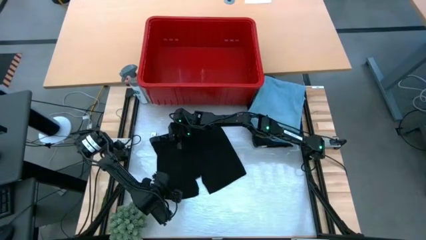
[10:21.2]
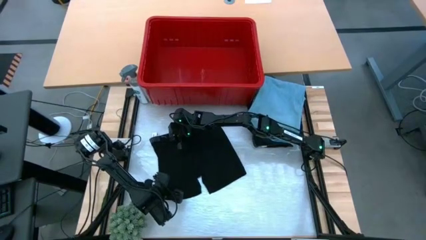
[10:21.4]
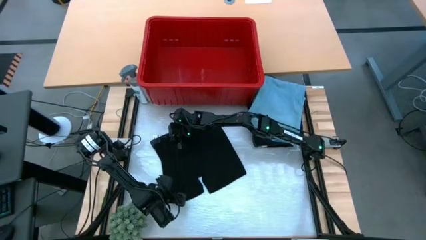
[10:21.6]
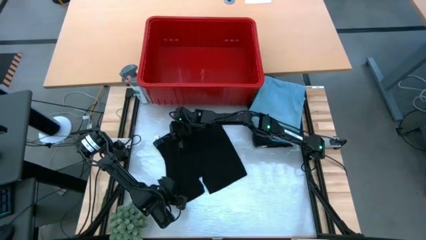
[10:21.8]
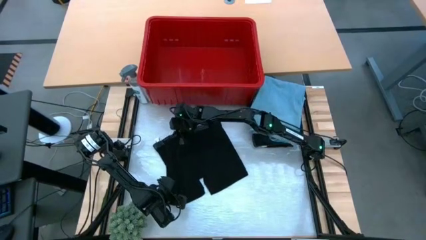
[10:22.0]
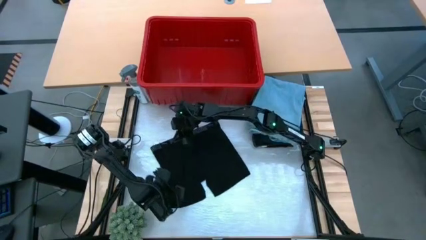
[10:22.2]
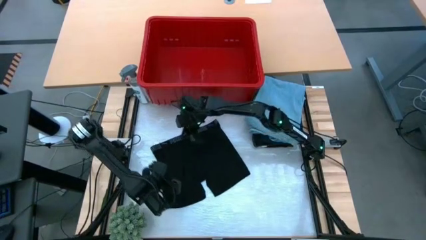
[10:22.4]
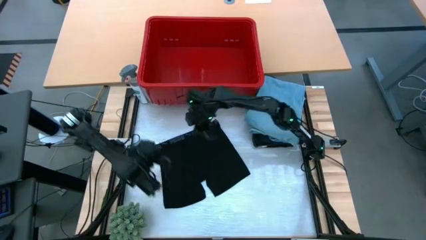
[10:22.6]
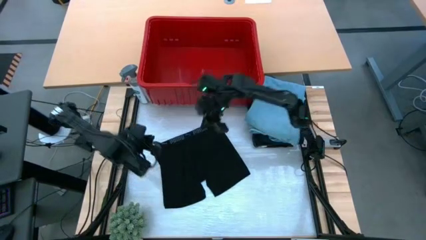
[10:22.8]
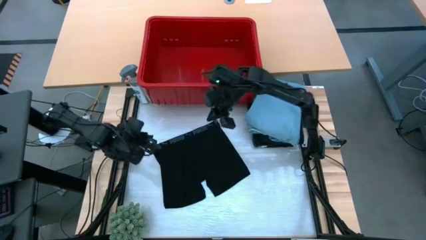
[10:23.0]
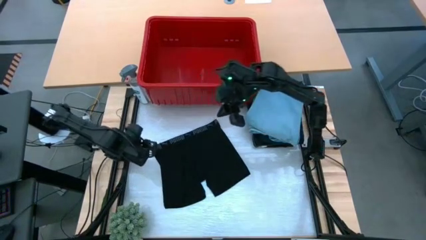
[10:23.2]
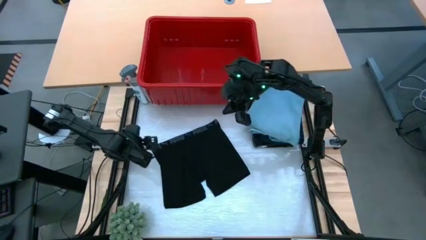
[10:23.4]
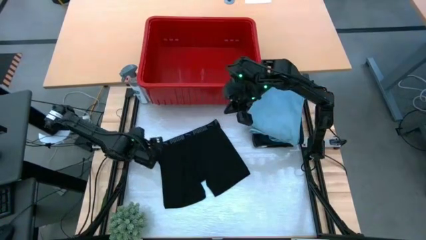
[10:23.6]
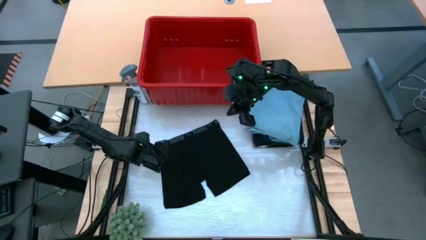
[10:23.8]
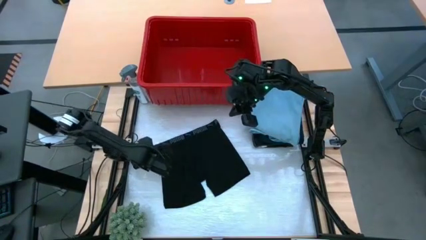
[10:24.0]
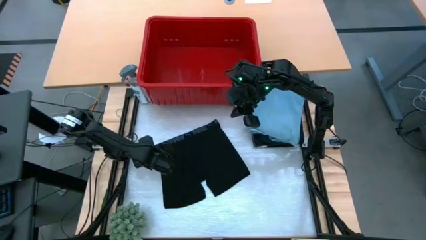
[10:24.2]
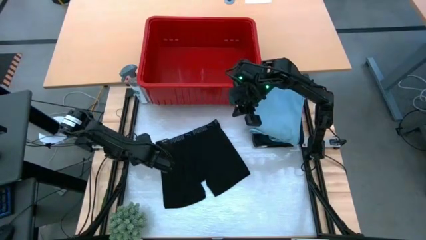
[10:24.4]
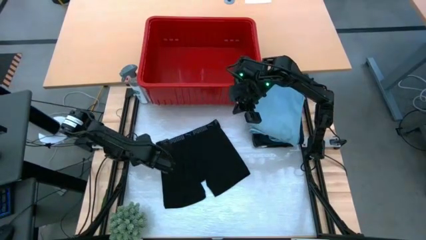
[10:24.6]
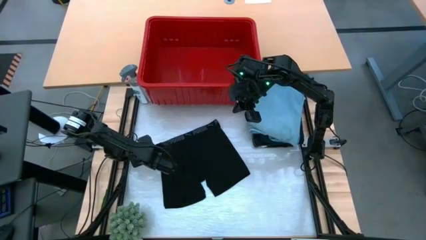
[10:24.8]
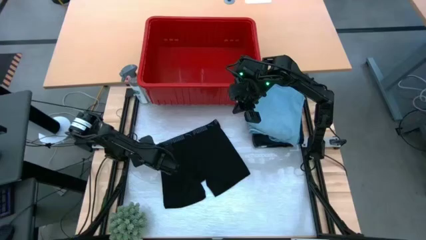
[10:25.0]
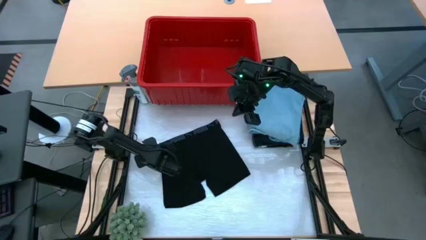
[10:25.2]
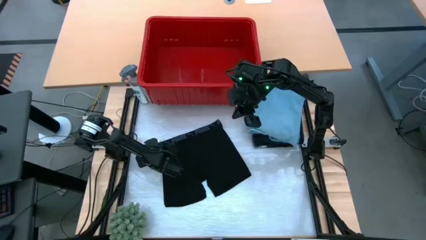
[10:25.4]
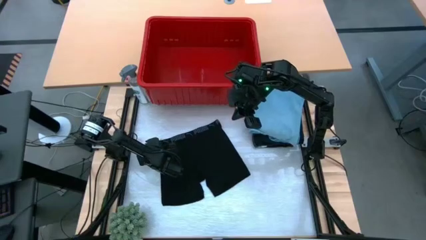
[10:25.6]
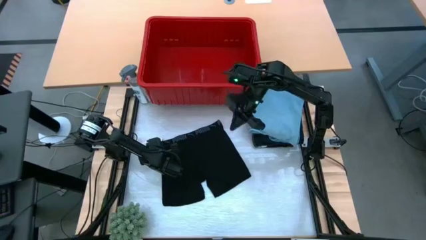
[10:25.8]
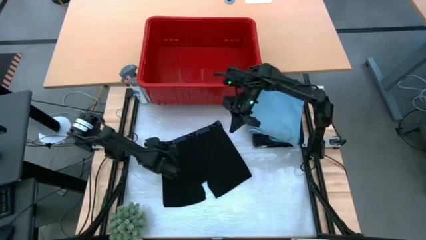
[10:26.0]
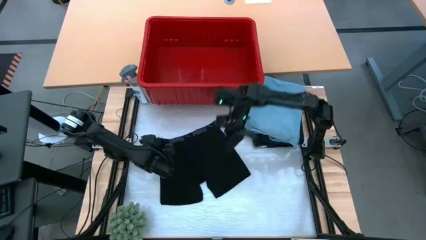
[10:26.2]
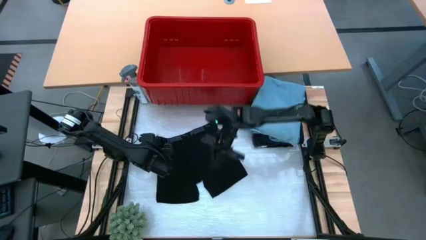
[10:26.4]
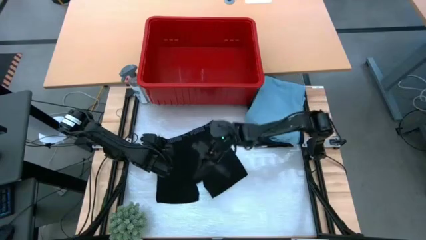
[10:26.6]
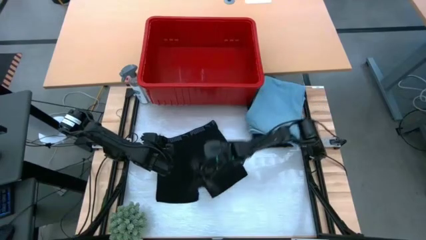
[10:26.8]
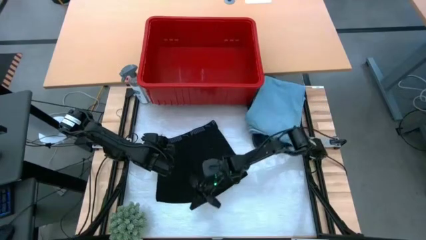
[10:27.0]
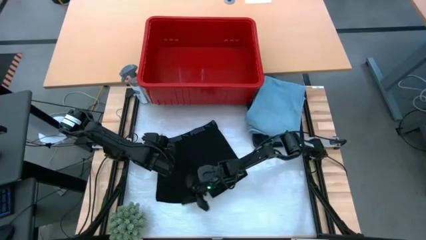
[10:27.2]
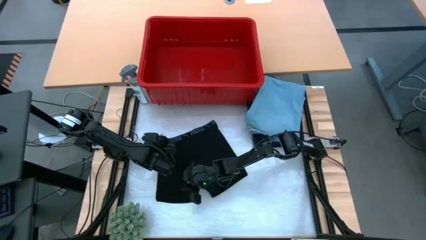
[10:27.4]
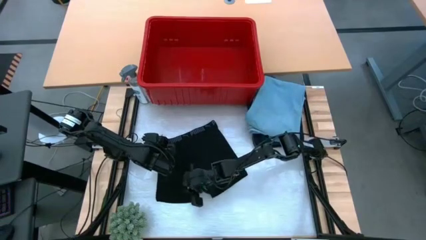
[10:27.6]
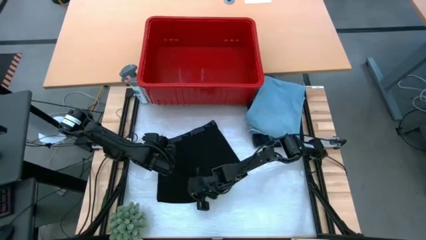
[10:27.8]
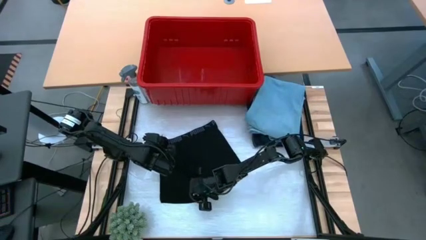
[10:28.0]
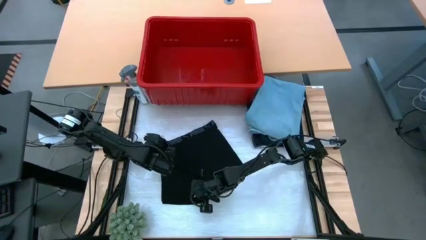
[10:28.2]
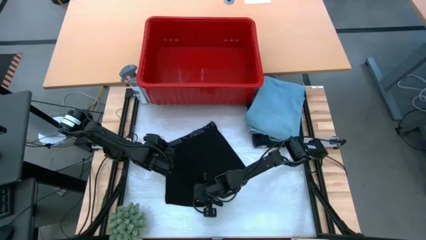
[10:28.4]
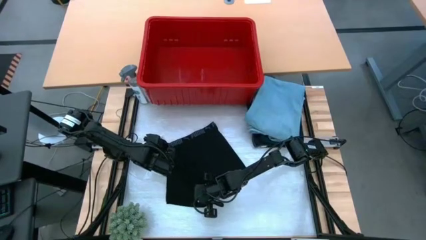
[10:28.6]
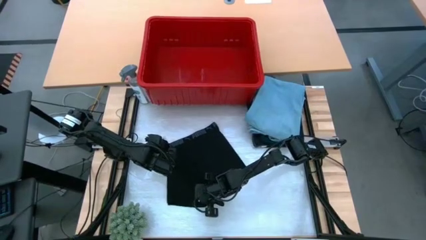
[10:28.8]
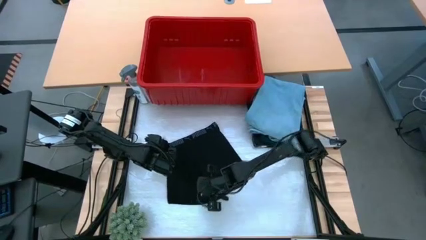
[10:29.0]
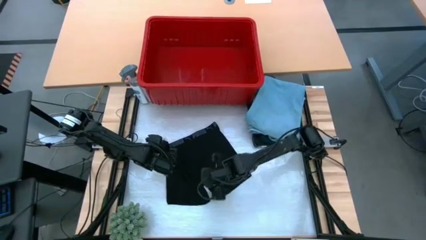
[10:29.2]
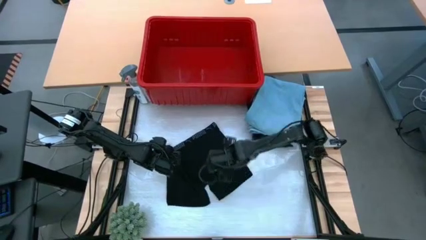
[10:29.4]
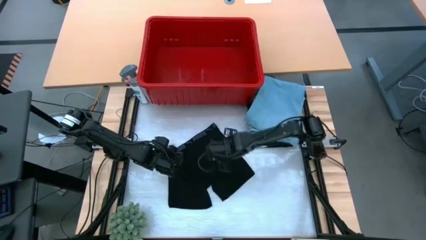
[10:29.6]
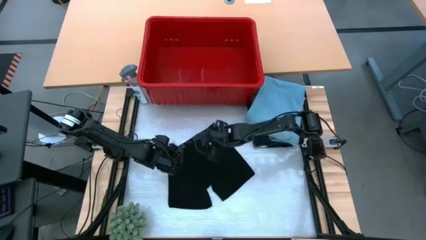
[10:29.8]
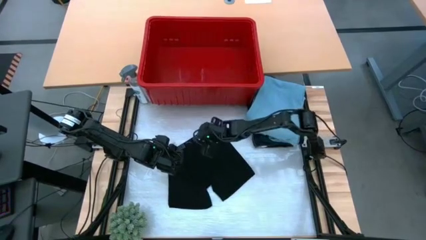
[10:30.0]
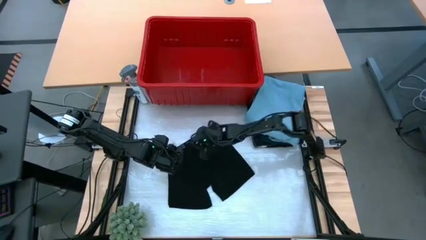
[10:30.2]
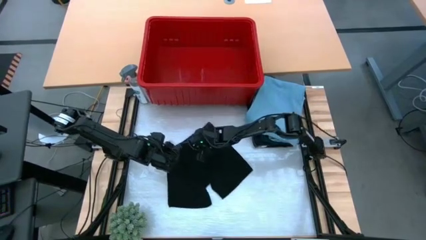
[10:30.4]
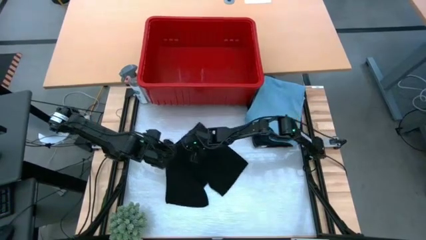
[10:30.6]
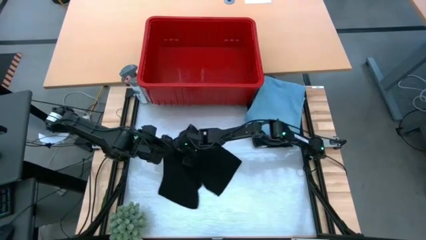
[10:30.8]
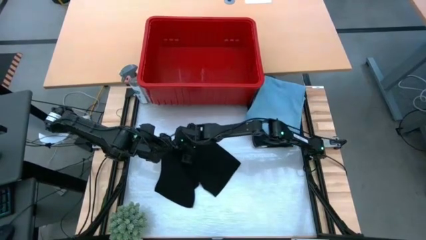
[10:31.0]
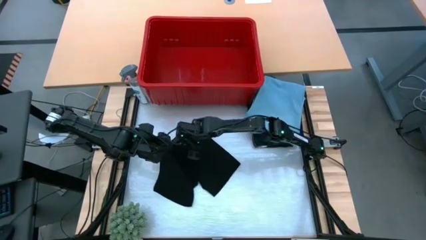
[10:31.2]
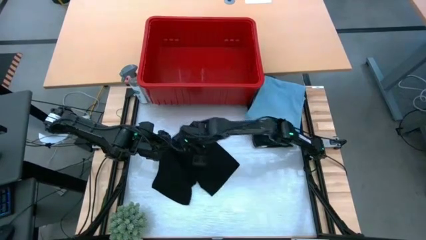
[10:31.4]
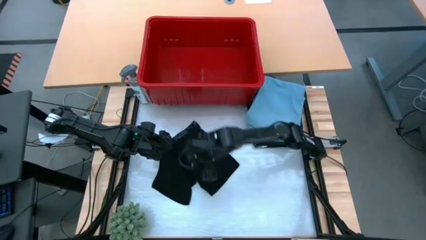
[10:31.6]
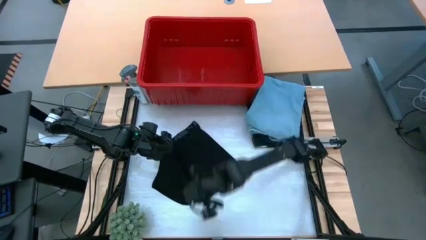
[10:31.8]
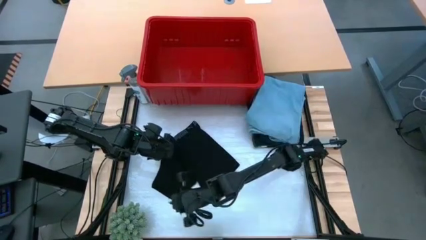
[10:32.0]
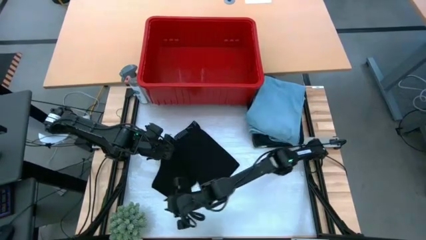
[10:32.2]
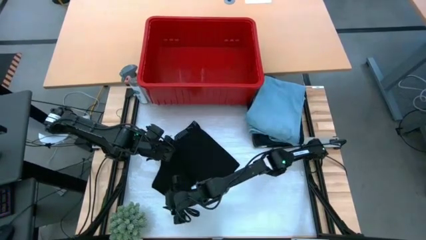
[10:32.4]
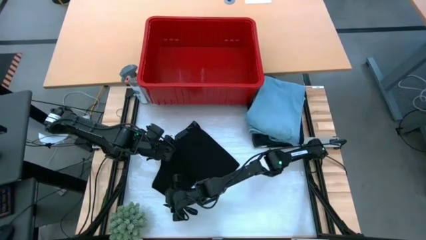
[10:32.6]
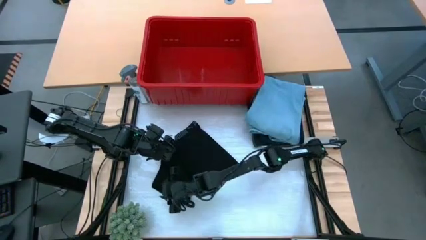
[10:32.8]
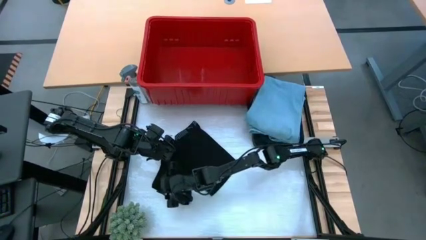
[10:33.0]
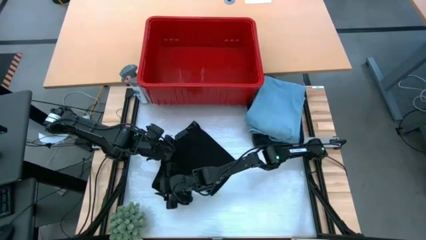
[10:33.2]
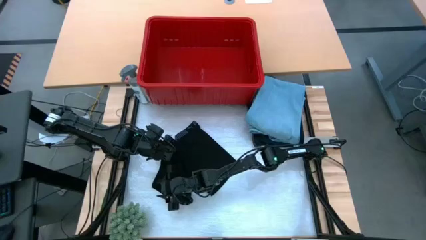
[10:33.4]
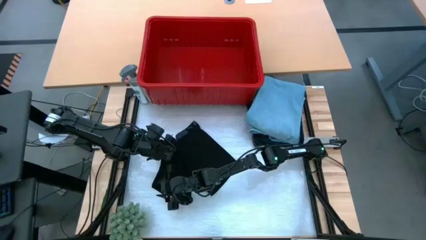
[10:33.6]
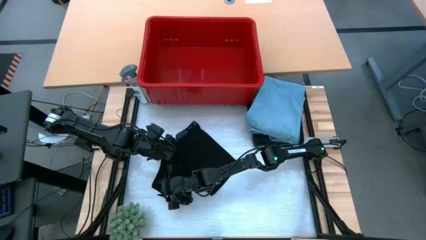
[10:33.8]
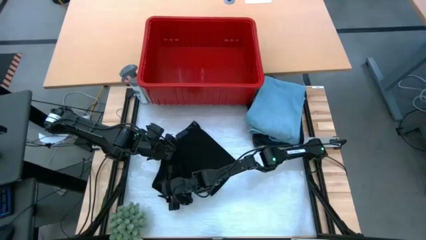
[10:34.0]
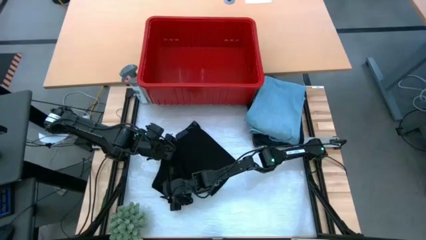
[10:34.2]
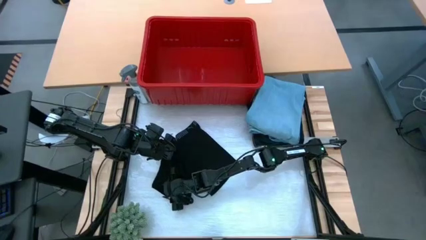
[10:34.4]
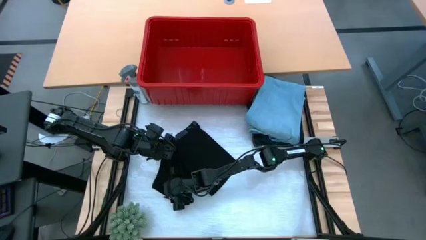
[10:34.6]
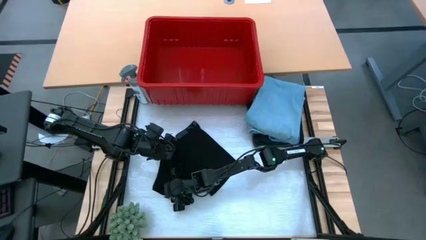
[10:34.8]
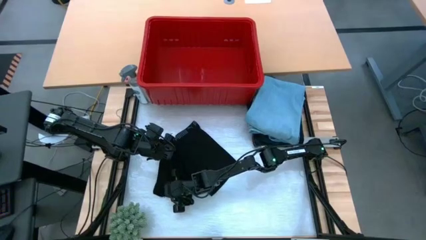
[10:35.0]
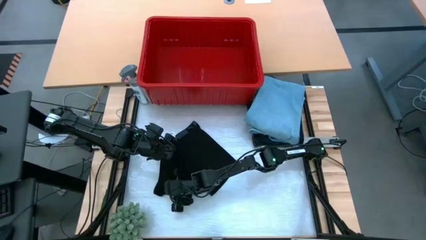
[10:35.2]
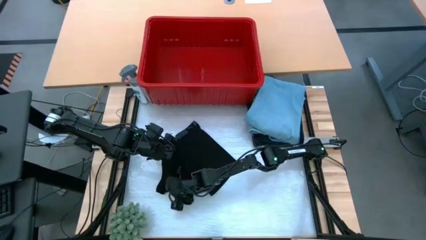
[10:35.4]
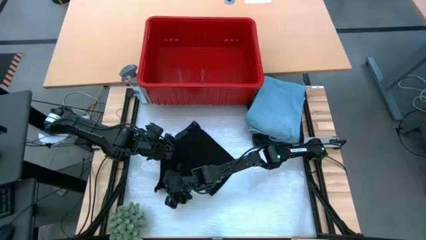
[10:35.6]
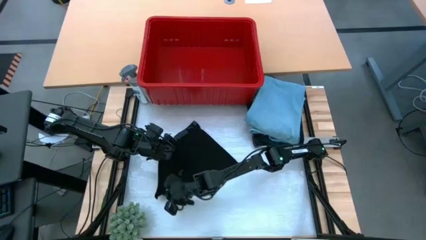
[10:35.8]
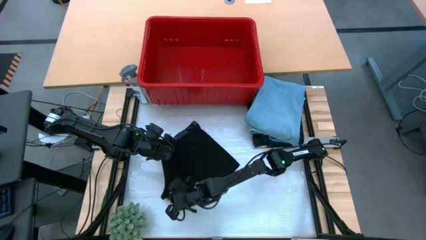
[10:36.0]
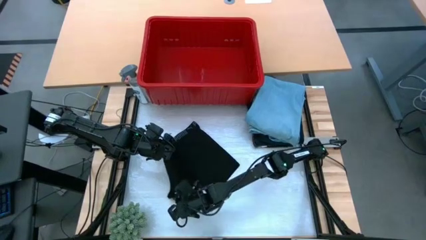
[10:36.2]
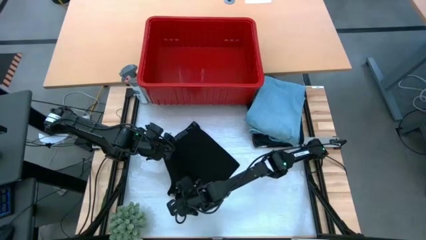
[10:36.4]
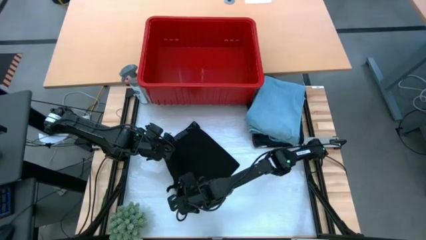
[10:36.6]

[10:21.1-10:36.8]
Task: Fold Laundry from Bin
Fold the black boxer short
